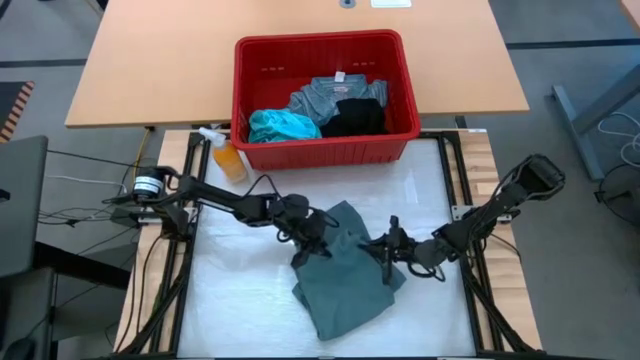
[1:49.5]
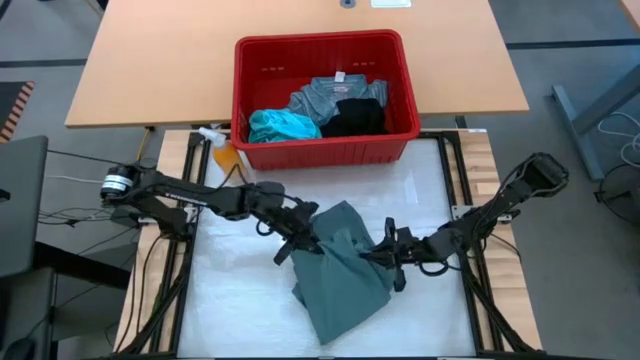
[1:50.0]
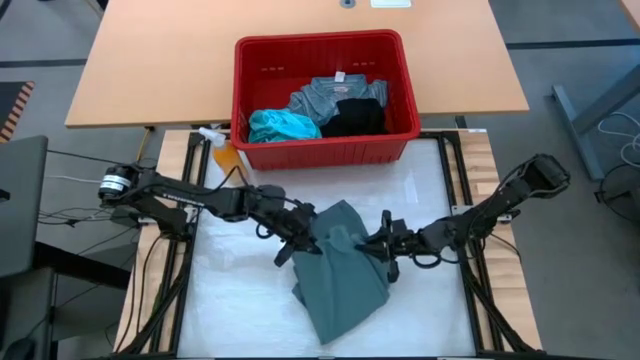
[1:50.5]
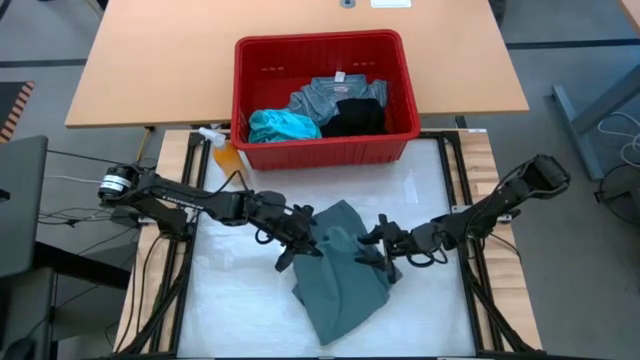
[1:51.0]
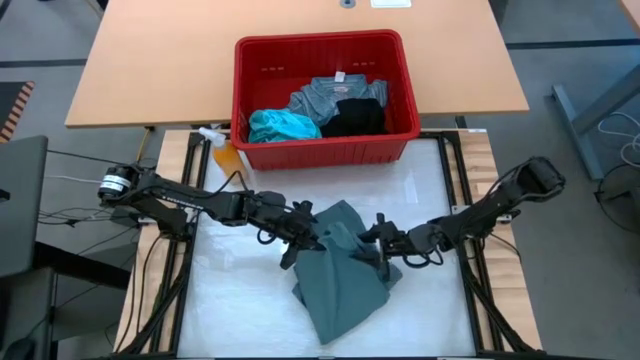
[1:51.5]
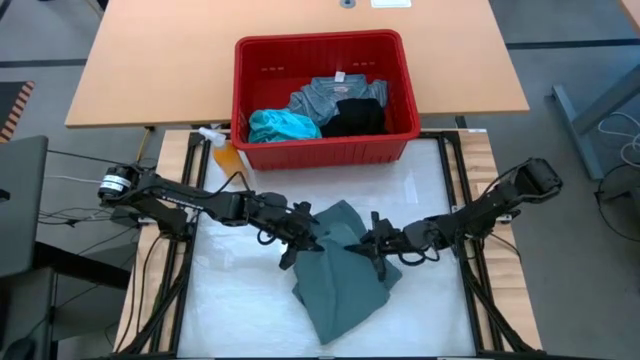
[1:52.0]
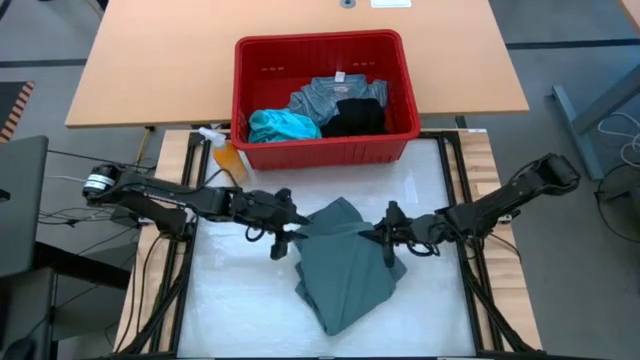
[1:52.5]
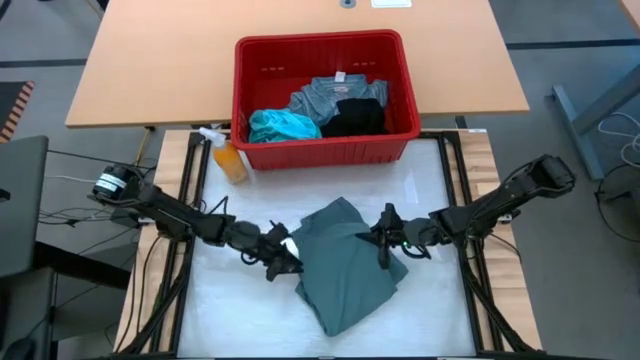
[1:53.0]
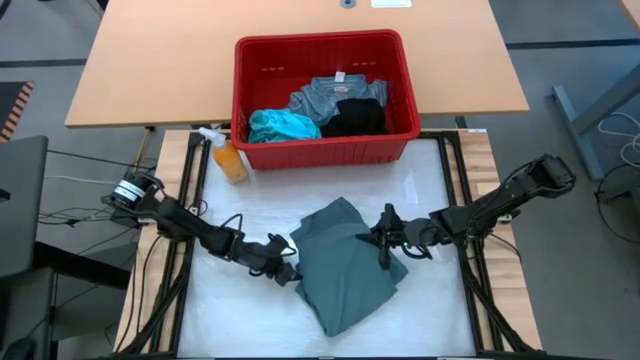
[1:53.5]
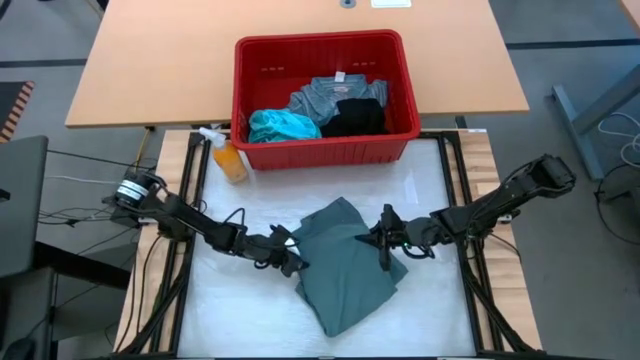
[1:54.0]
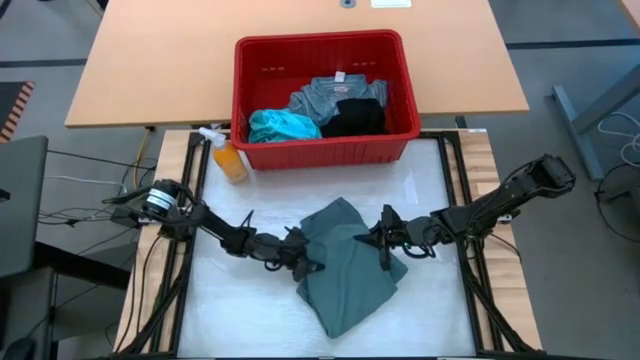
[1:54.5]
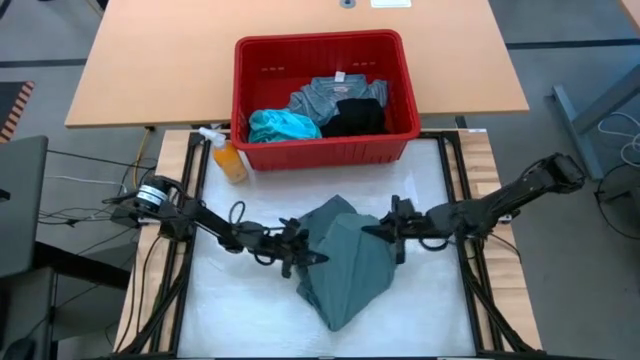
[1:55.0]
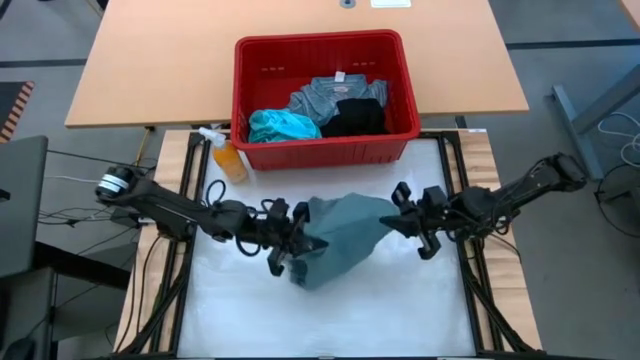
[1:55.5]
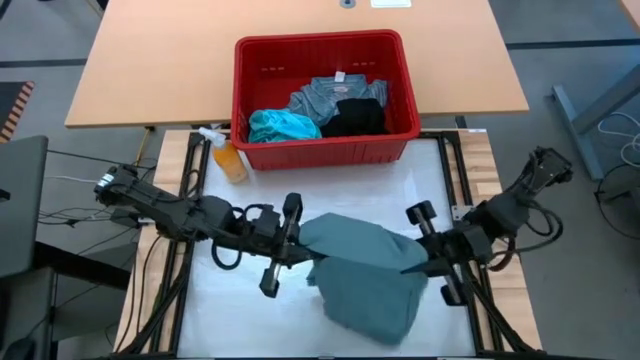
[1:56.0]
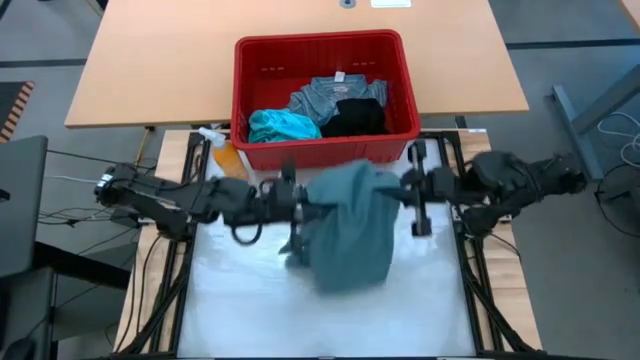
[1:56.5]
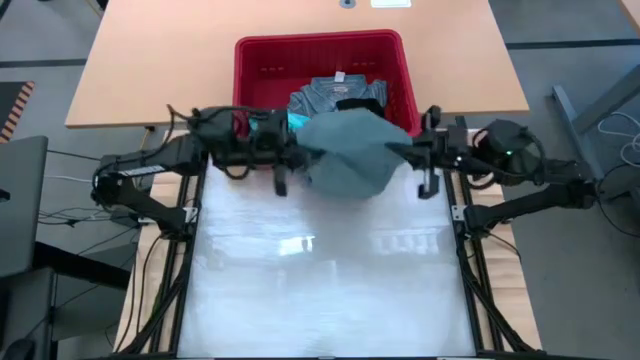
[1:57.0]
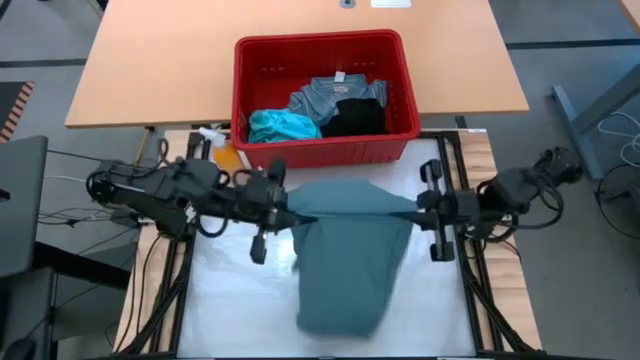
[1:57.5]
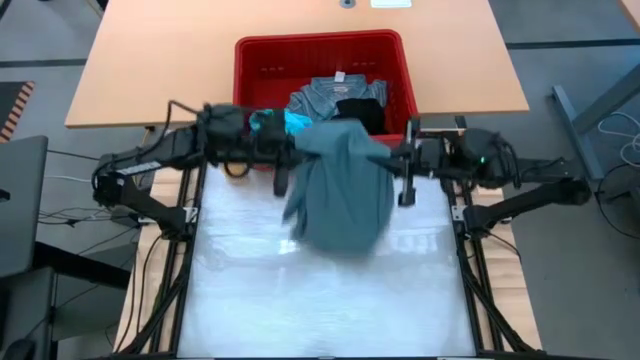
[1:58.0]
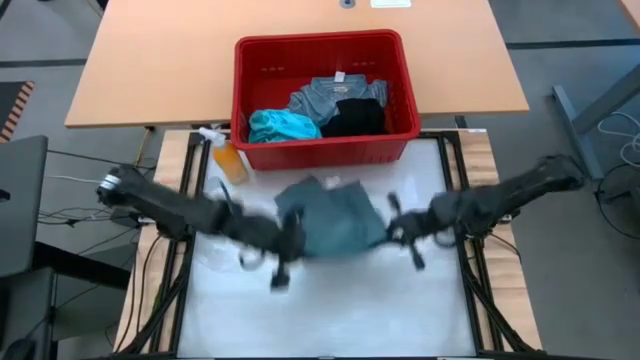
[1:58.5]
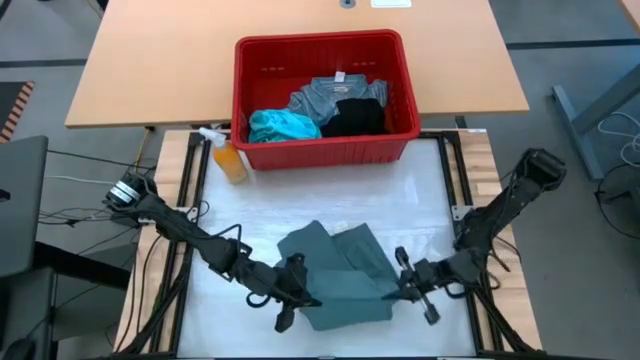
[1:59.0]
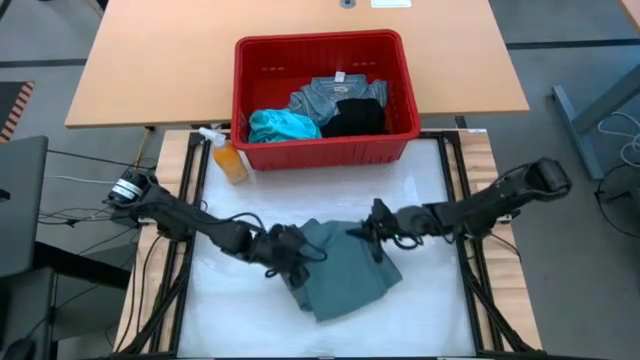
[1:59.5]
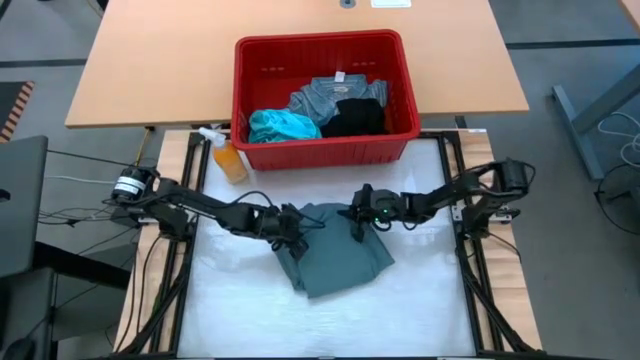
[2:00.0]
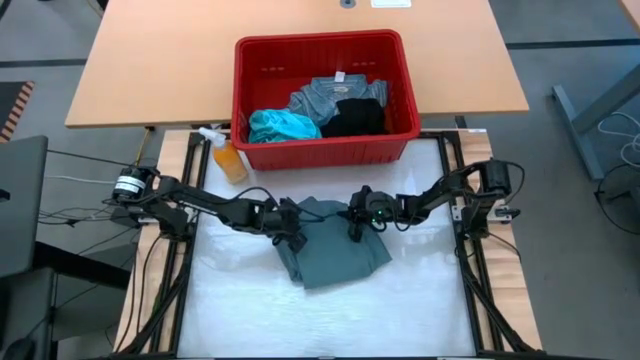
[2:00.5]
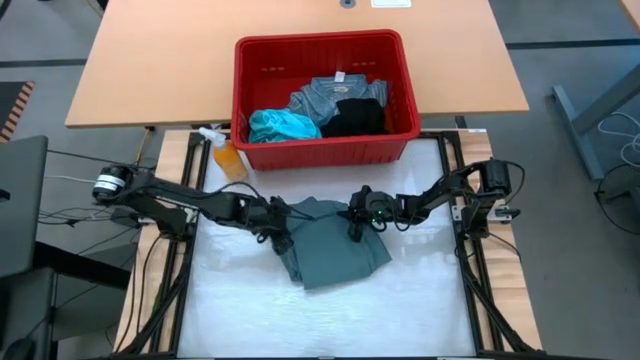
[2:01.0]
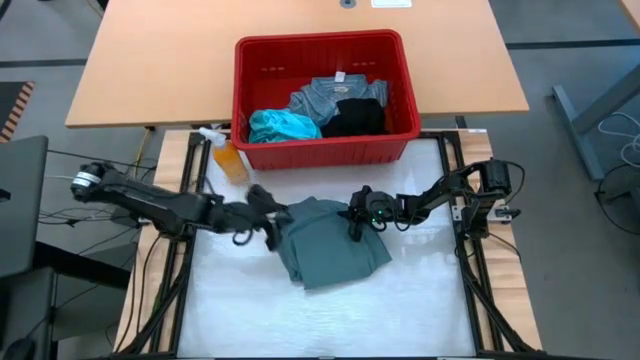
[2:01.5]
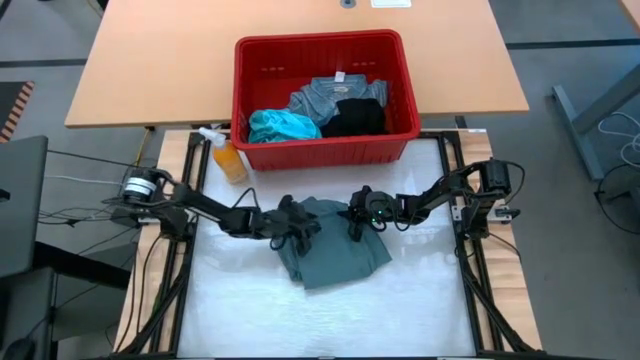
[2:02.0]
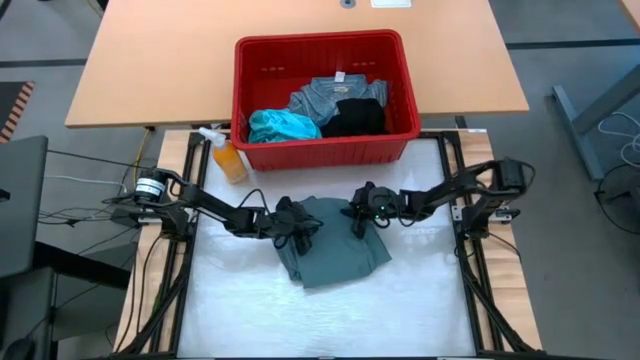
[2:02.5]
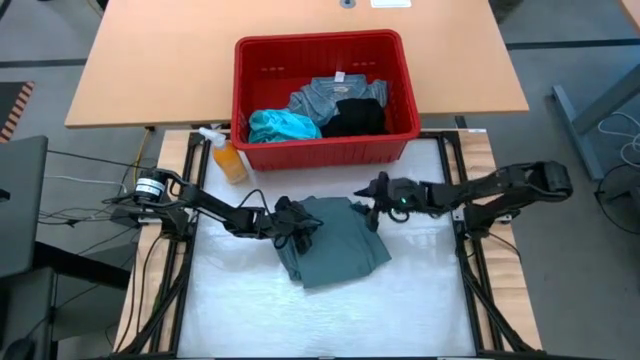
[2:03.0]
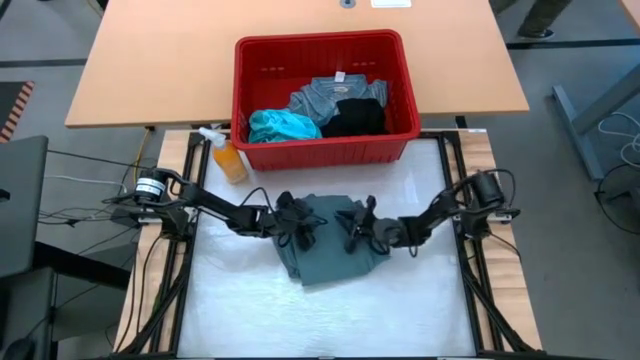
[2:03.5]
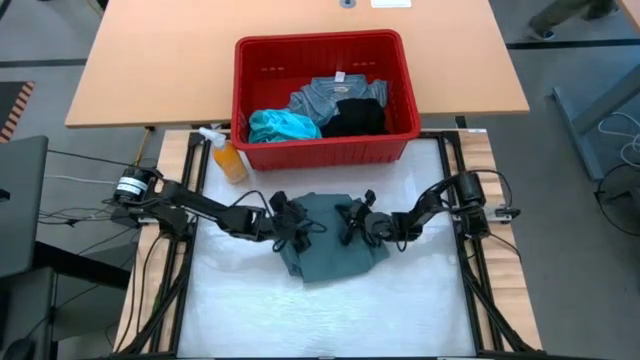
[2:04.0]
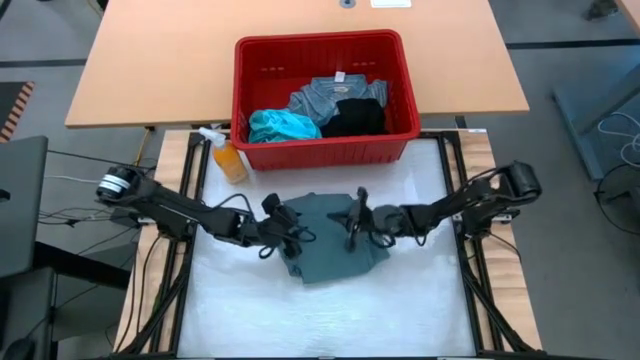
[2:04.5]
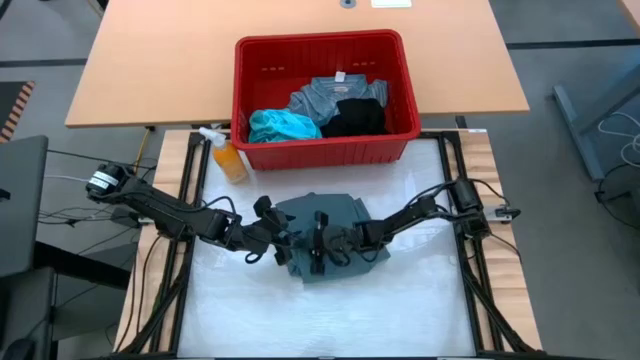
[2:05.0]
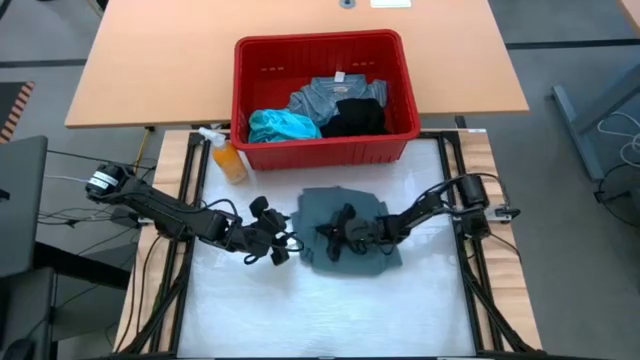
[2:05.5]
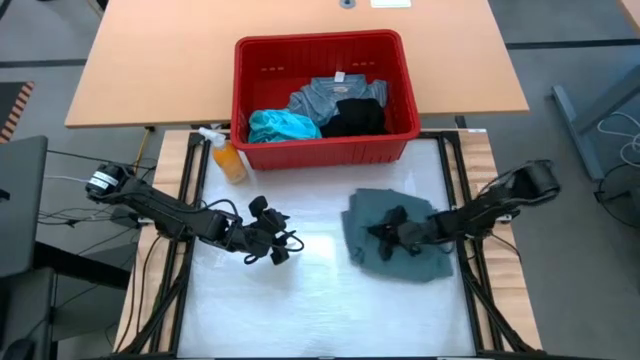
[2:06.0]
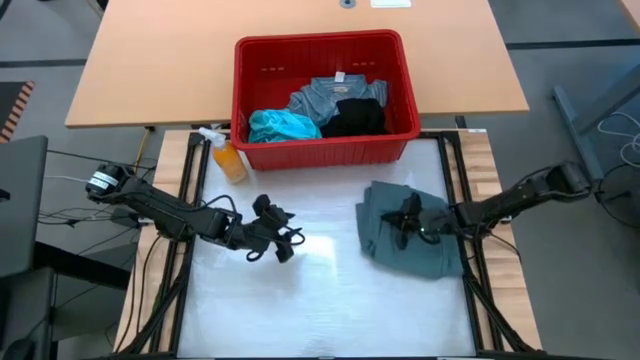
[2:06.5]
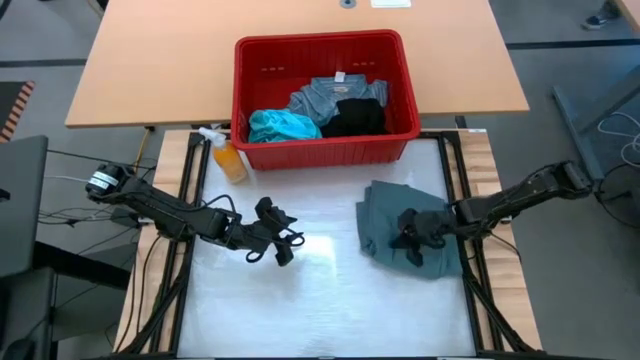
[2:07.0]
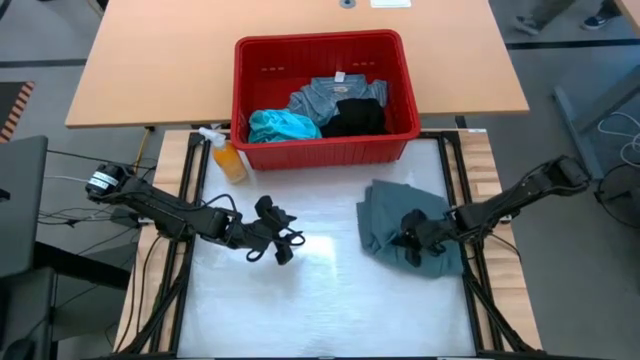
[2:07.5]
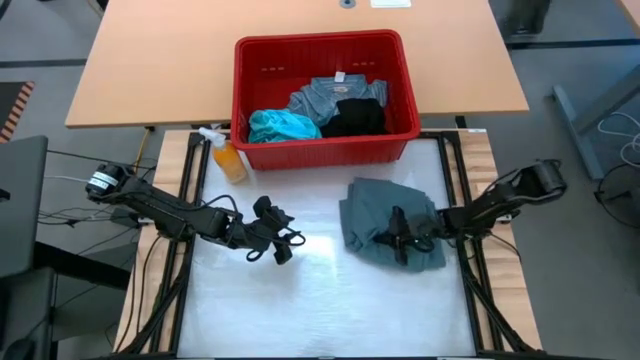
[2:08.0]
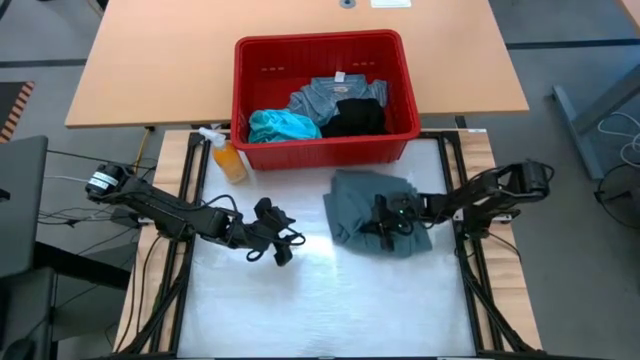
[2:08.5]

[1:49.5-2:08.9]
Task: Fold Laundry from Bin
Fold the gray pants

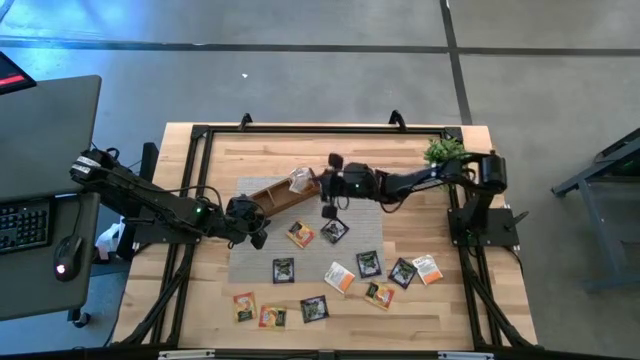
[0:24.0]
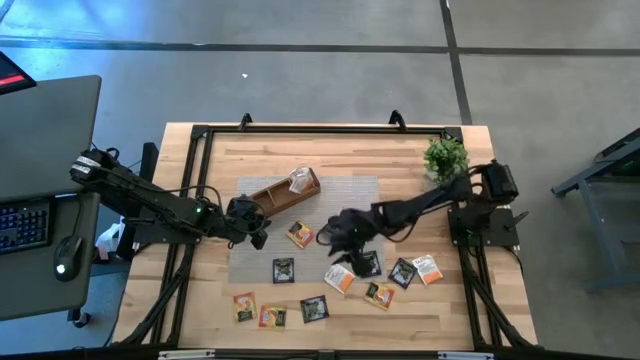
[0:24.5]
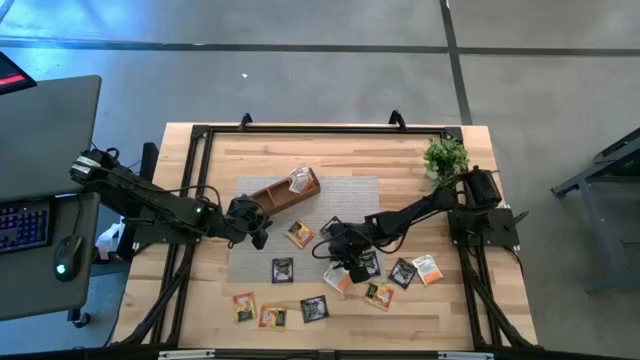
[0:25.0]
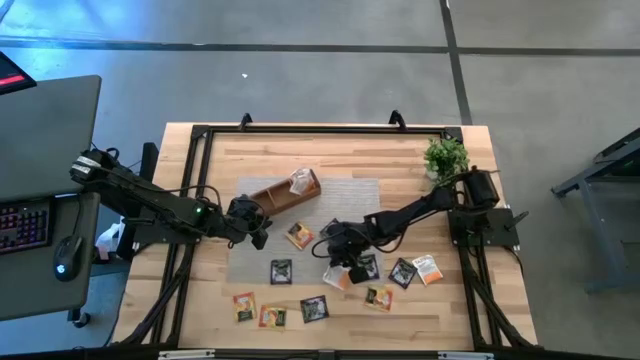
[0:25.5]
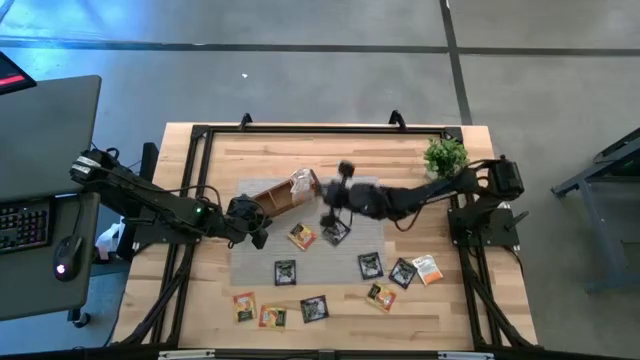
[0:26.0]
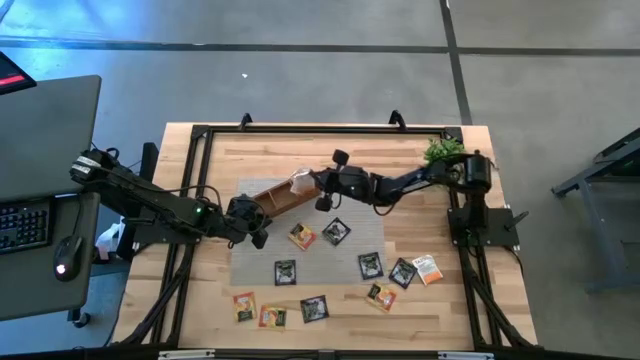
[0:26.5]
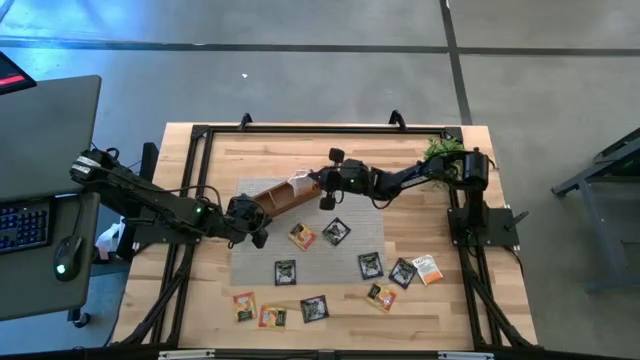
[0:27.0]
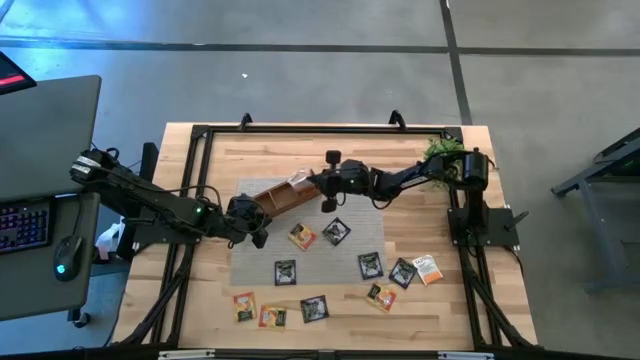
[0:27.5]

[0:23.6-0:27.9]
Task: Pick & Place Tea
Put the orange tea bag into the right section of the wooden organizer
